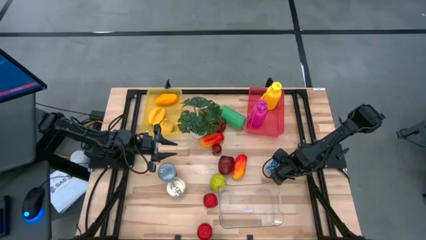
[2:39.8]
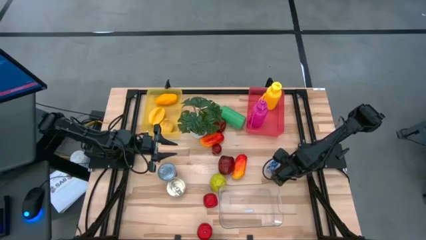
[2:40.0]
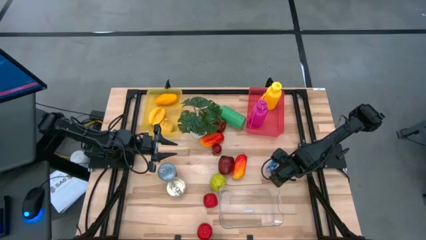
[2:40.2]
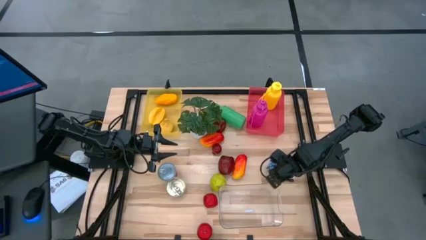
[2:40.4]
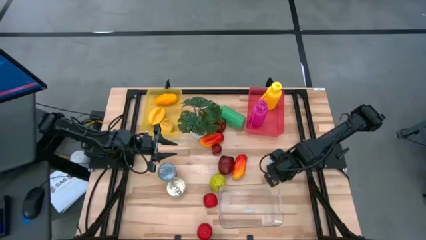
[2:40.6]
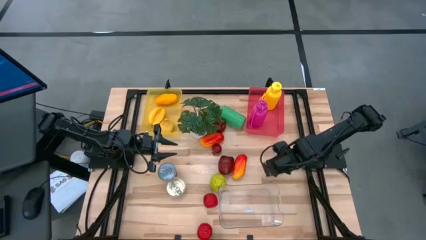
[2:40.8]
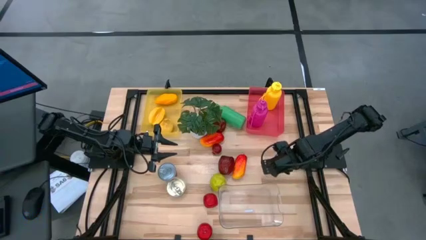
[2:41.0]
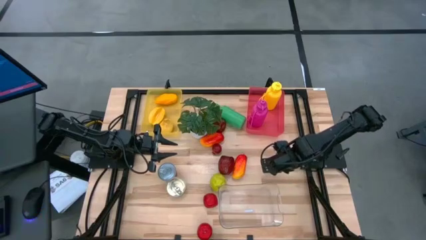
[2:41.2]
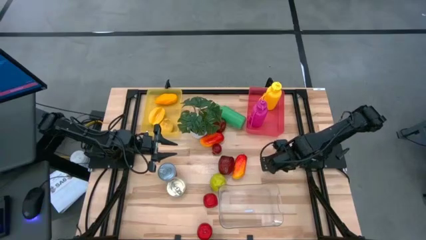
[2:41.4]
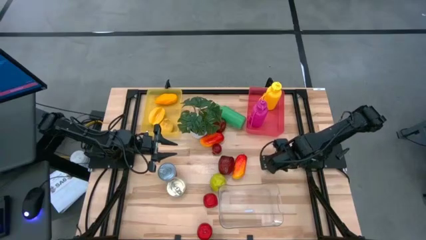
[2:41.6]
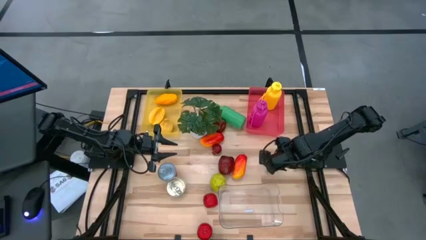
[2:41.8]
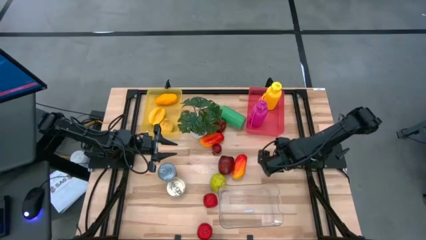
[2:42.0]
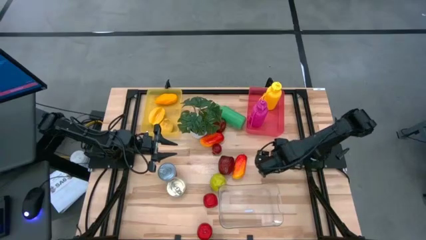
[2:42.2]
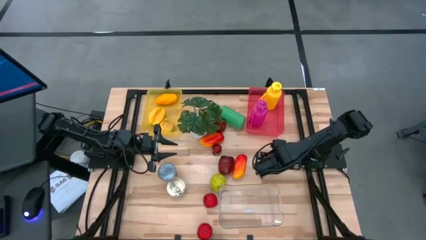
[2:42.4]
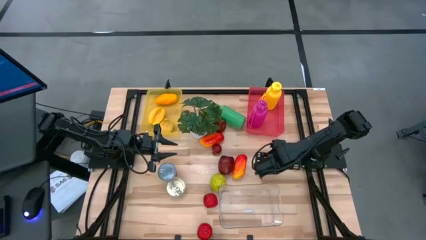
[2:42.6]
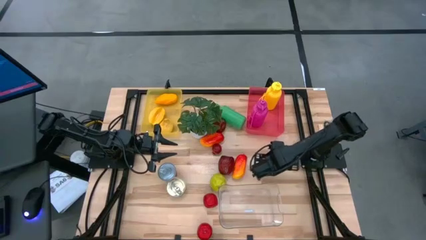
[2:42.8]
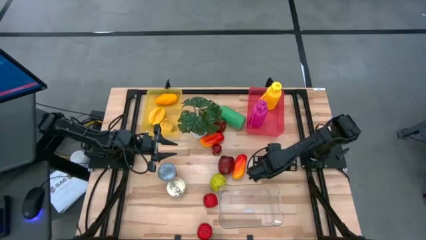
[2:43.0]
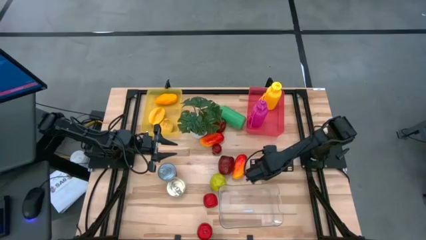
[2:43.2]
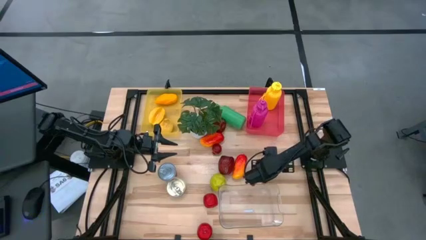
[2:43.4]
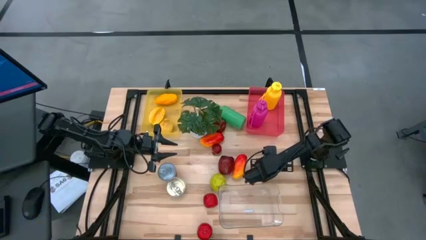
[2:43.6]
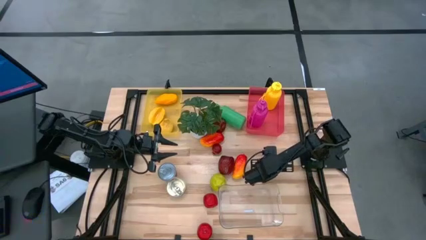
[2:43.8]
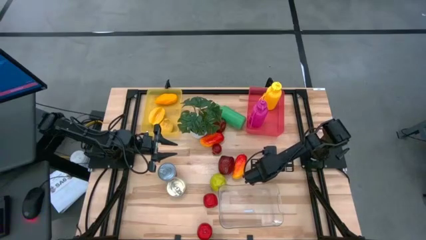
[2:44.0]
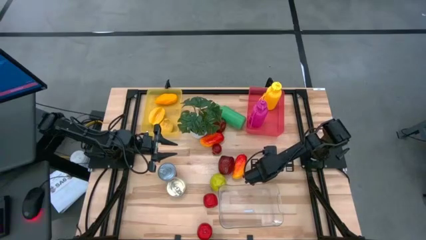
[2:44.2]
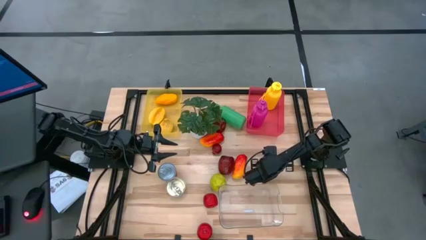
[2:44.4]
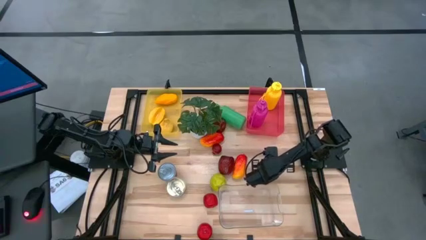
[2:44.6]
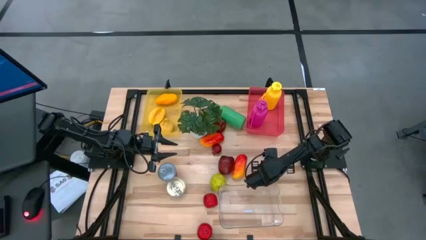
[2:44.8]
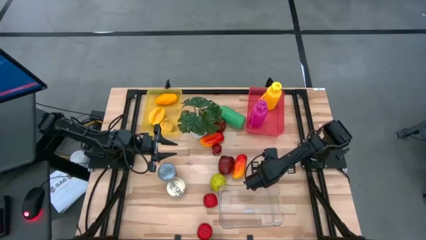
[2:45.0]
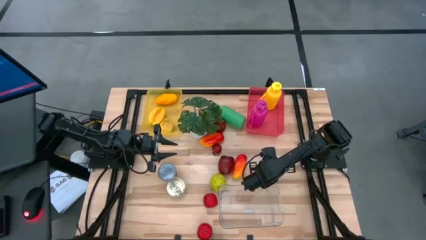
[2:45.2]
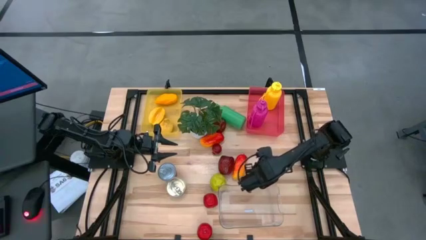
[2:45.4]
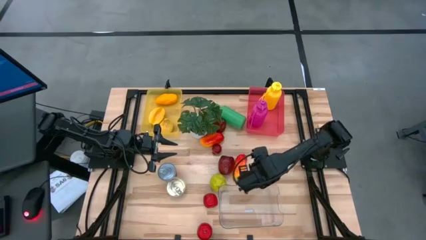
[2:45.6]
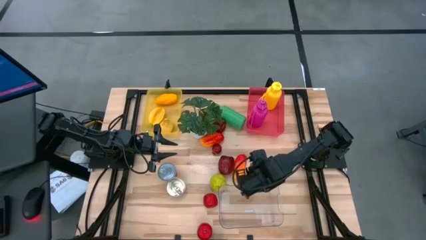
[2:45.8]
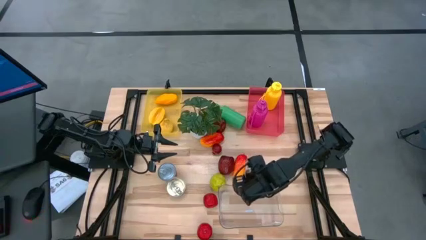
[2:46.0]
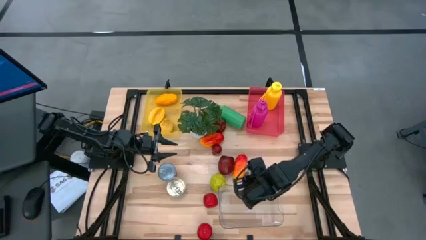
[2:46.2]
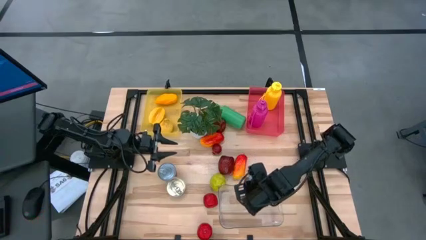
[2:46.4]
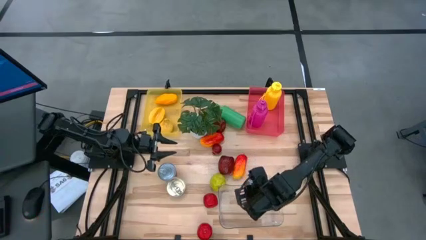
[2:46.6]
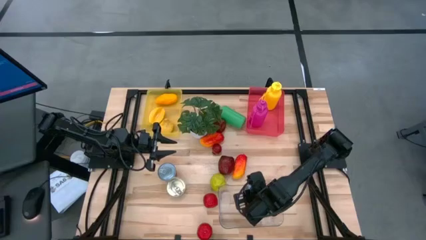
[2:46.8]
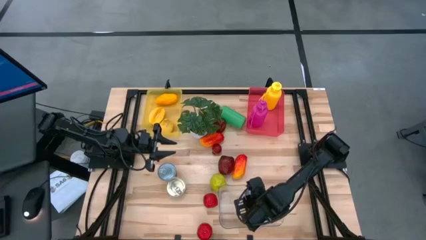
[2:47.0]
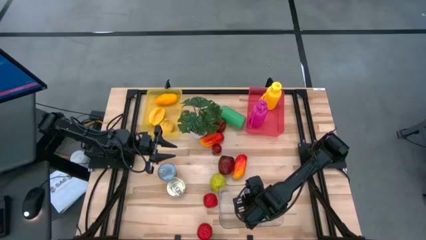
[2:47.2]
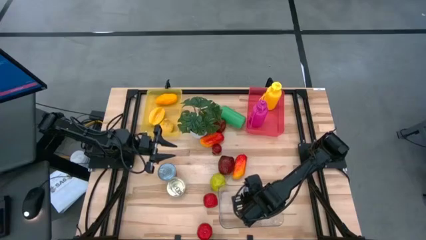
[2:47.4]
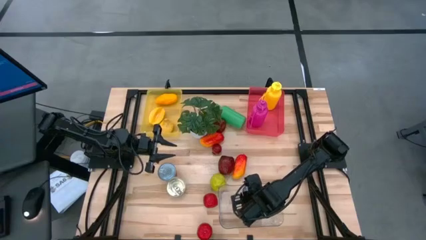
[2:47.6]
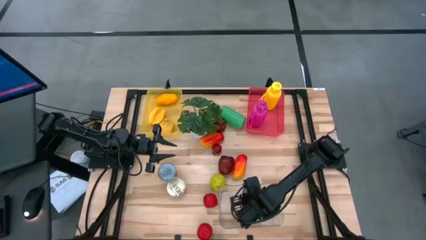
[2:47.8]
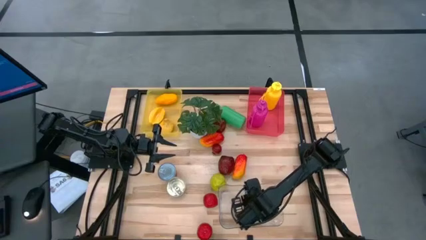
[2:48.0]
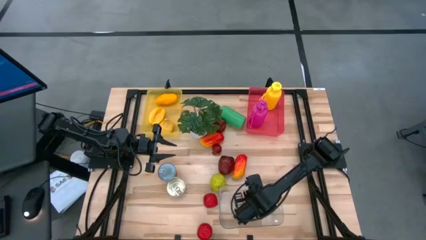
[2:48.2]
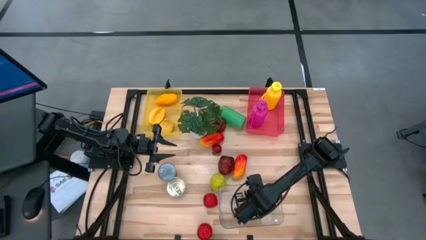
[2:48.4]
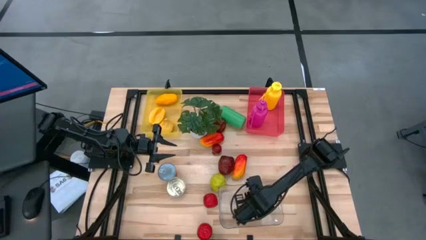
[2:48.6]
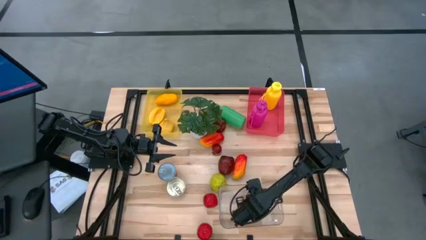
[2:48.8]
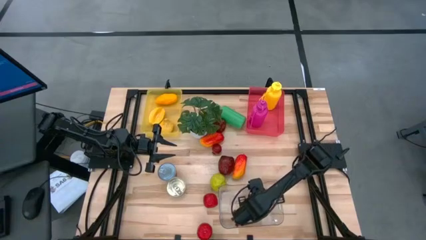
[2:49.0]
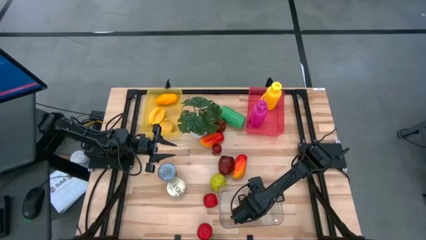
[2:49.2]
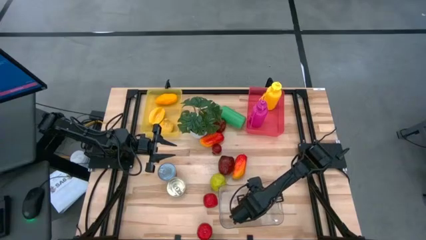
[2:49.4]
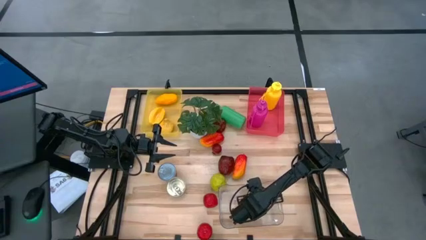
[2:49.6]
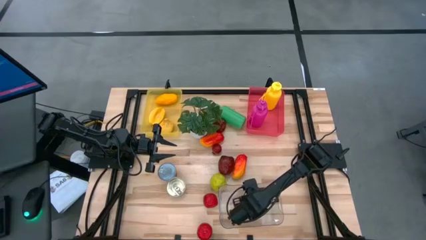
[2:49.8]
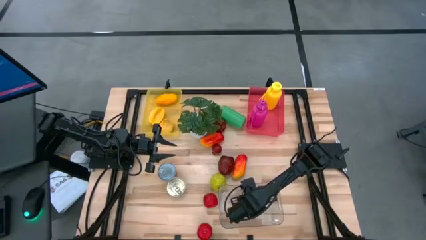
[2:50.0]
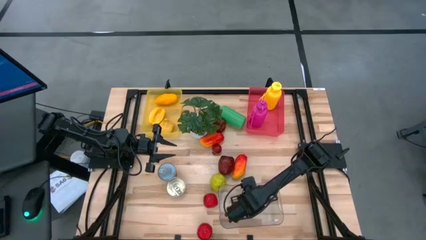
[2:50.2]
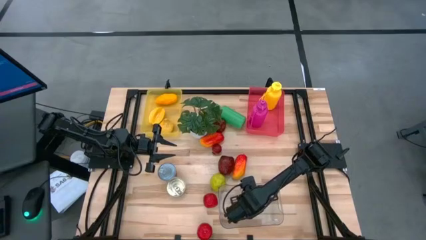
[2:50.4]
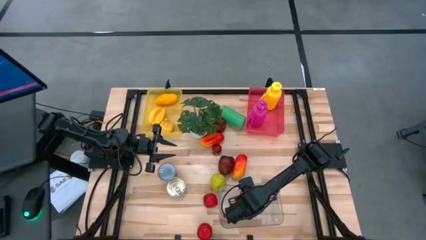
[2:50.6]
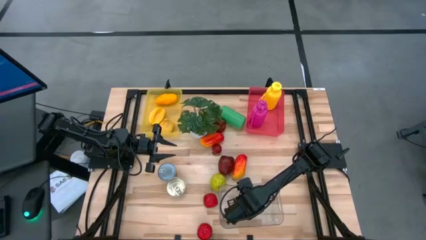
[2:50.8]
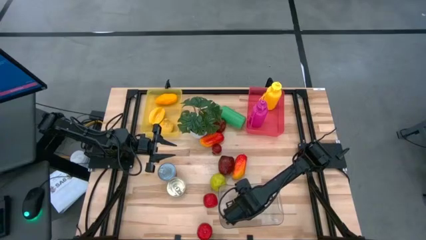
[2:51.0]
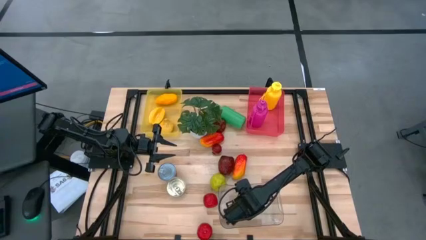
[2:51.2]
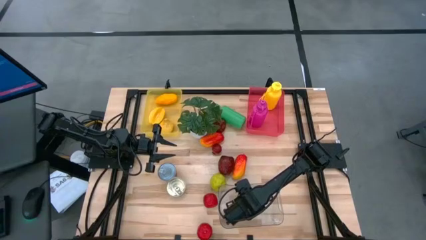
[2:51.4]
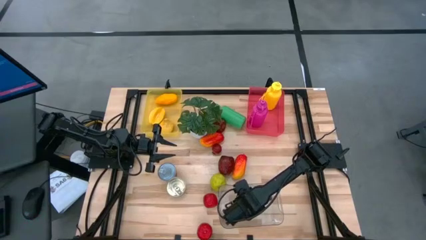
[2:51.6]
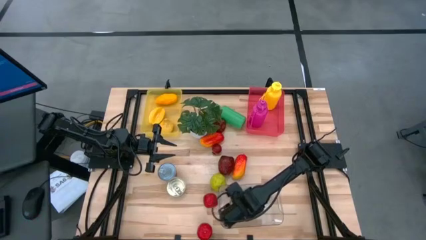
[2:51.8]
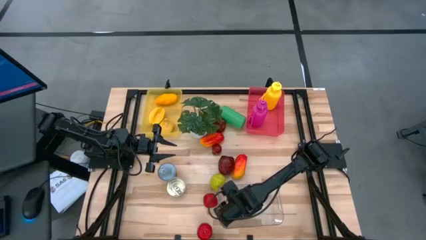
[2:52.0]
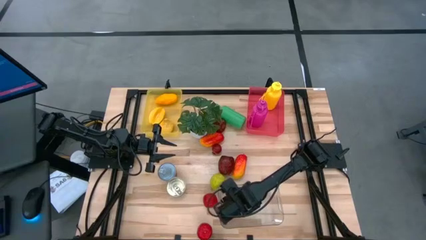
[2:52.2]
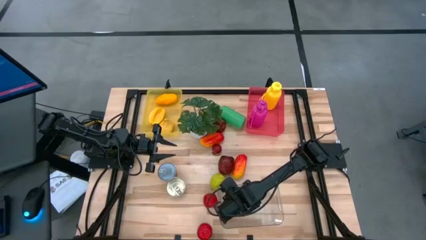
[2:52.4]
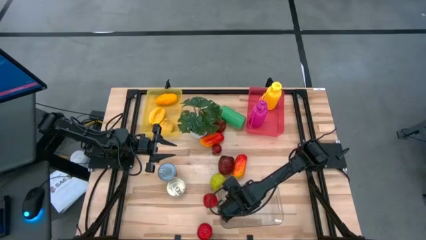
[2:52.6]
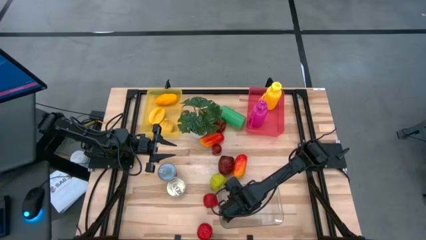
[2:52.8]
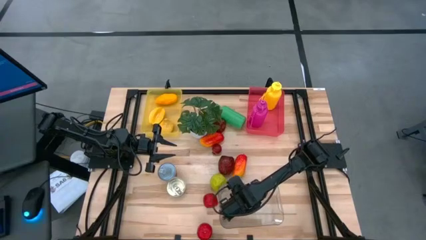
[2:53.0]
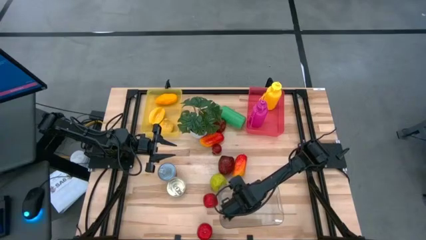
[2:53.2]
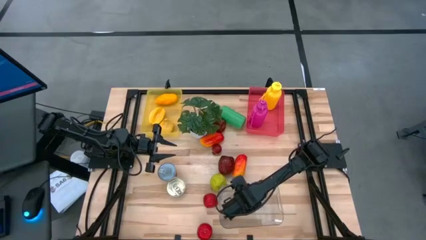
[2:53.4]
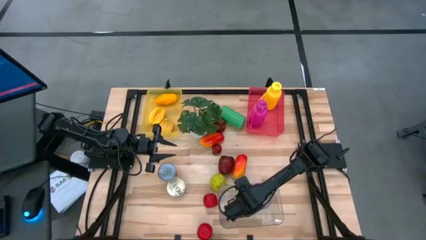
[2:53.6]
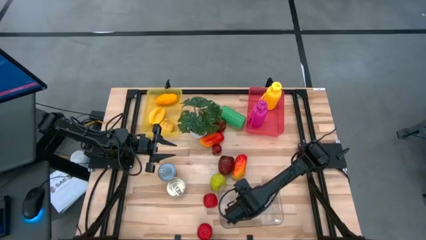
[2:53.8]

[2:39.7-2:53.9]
Task: Pick & Place Food Item
Put the blue tuna can into the transparent bin

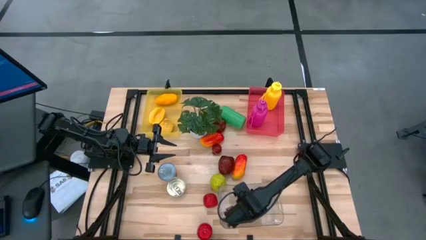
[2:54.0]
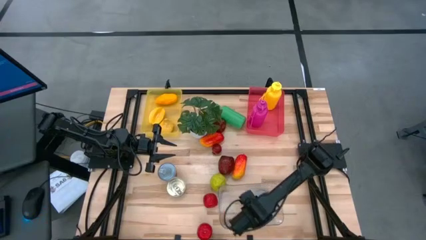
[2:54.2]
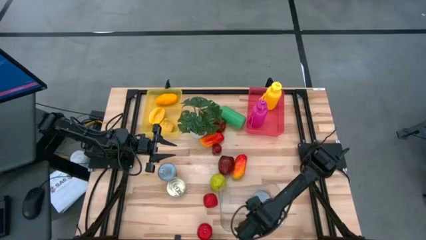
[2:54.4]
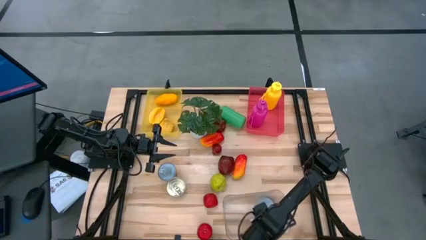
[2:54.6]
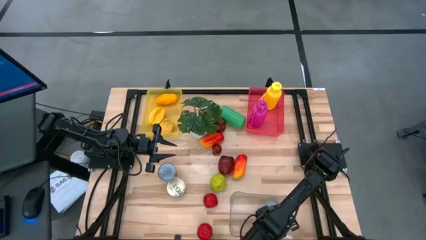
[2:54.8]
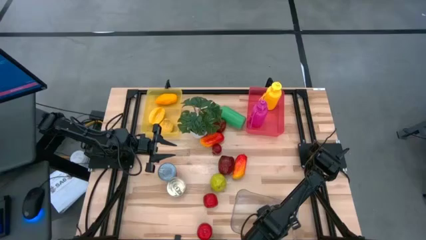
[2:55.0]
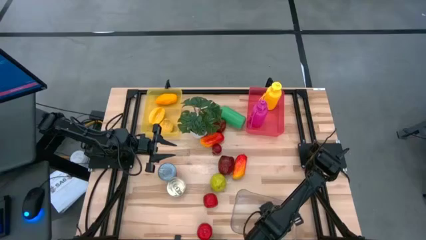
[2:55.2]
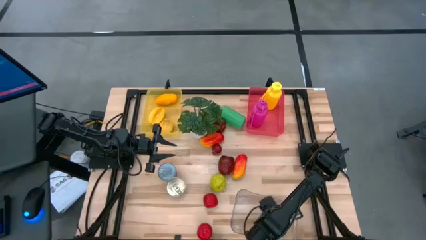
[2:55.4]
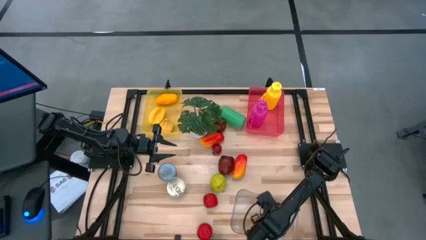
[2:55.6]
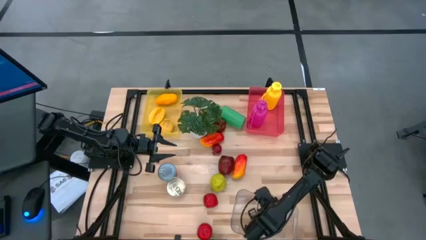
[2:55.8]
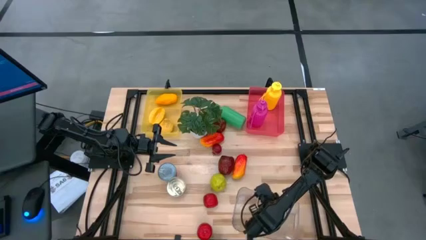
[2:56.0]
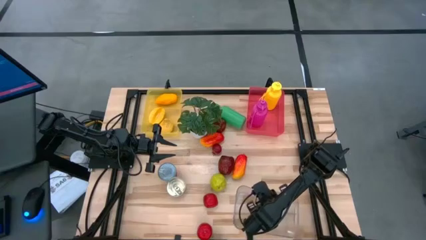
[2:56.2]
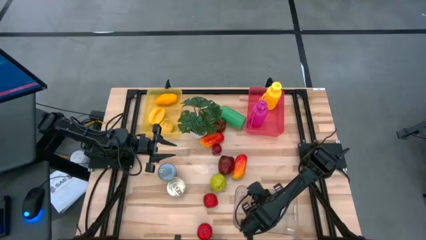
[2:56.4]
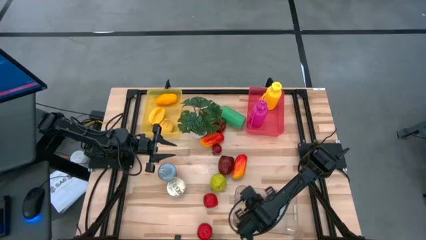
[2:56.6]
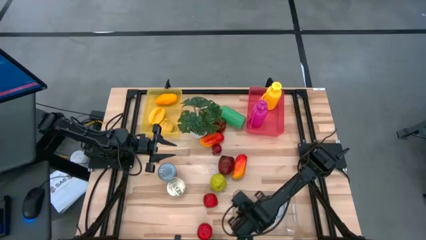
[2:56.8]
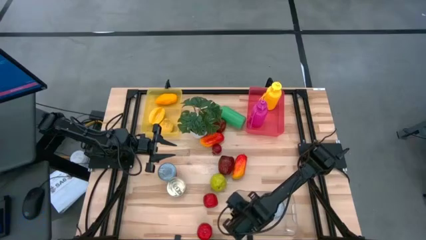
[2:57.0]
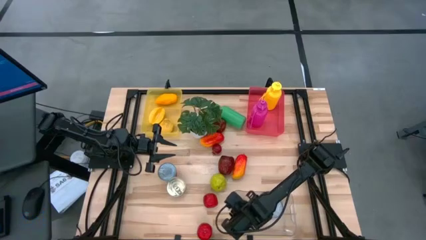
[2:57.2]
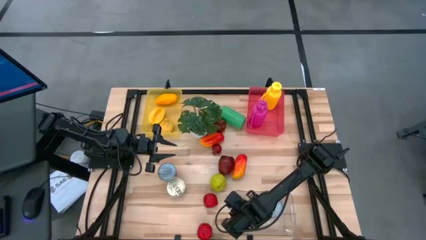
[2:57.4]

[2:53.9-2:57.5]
Adjust the transparent bin
